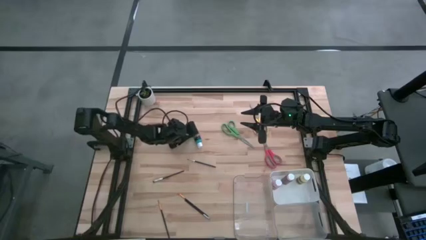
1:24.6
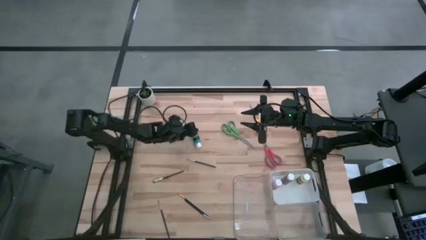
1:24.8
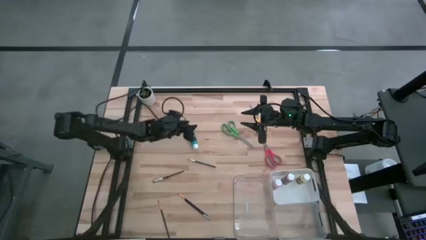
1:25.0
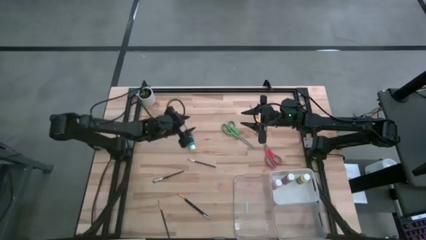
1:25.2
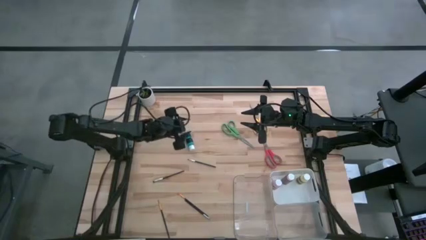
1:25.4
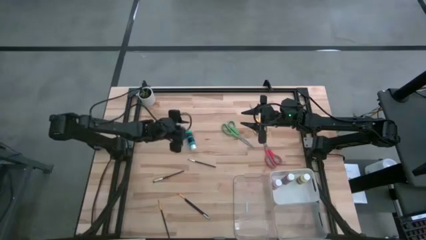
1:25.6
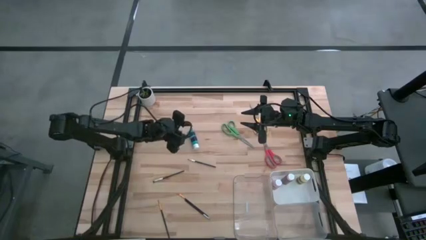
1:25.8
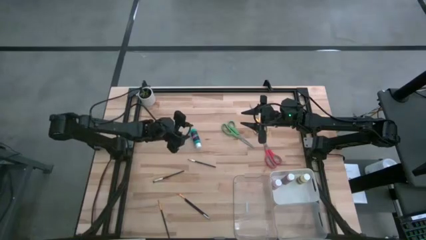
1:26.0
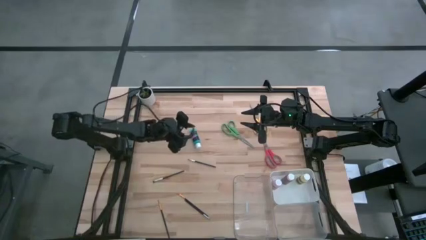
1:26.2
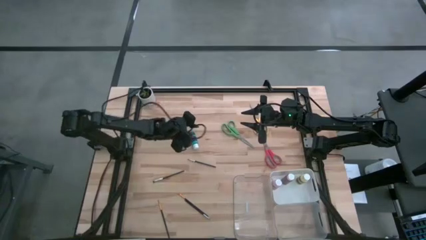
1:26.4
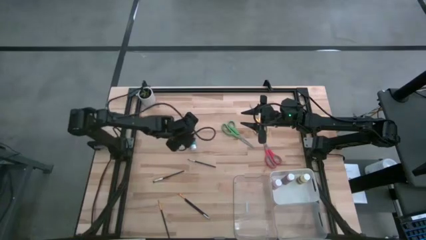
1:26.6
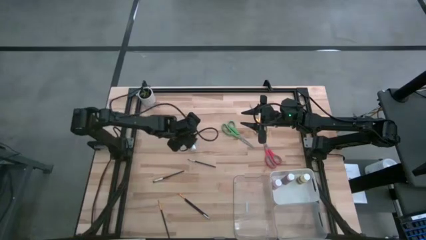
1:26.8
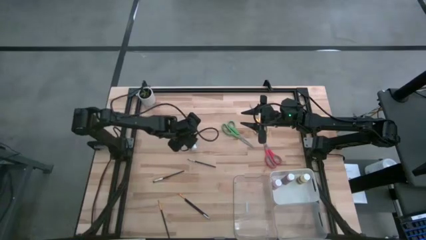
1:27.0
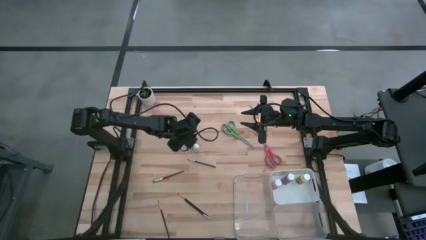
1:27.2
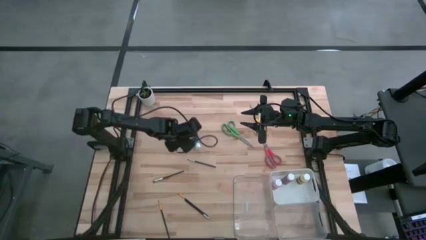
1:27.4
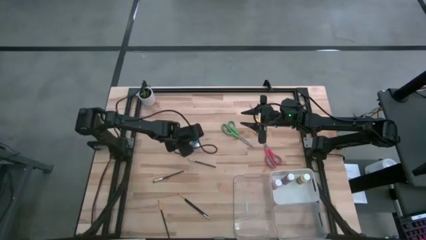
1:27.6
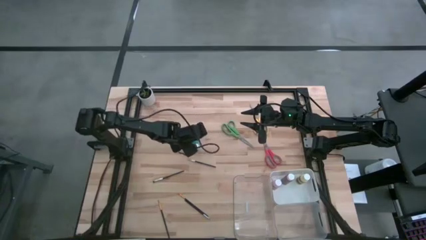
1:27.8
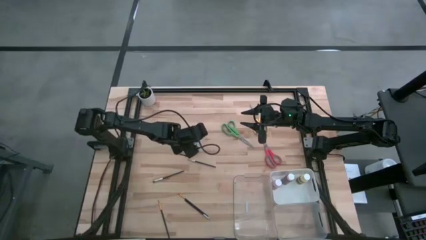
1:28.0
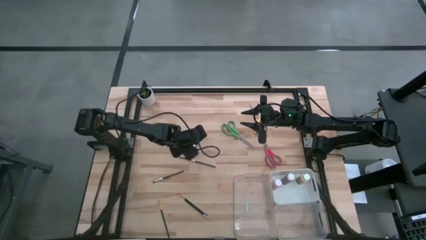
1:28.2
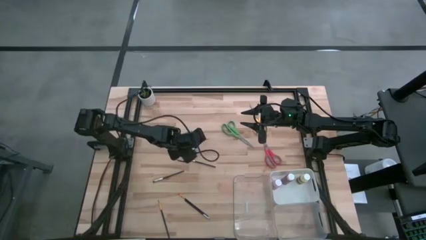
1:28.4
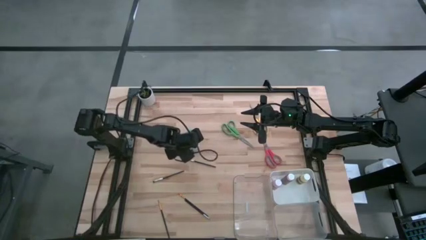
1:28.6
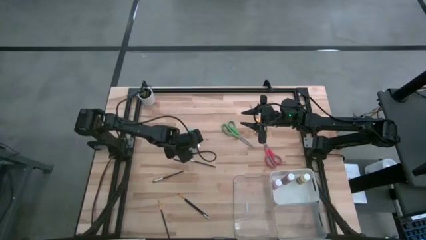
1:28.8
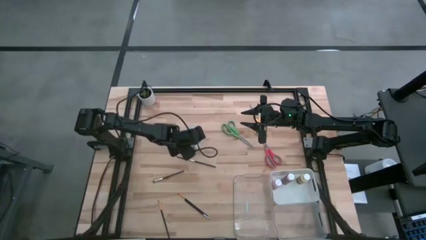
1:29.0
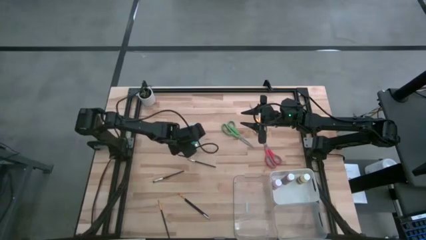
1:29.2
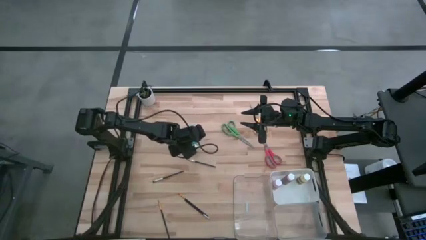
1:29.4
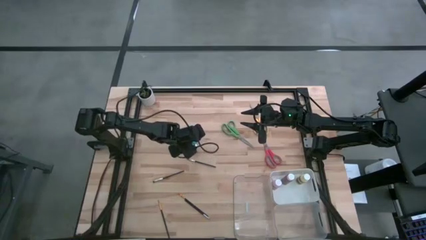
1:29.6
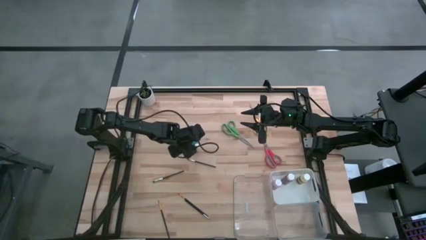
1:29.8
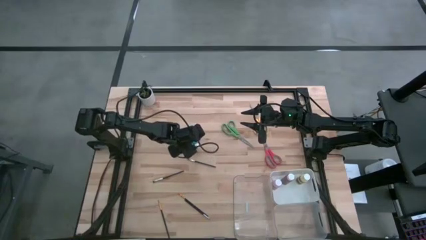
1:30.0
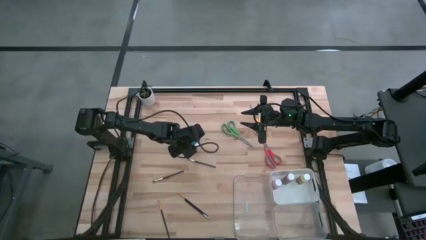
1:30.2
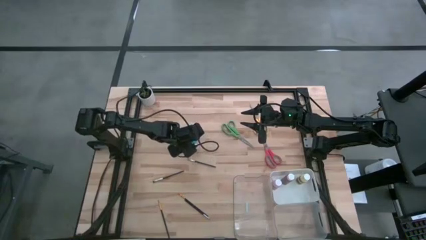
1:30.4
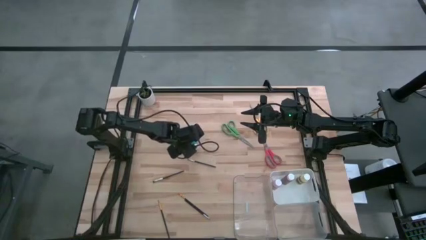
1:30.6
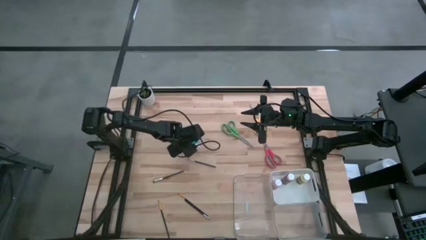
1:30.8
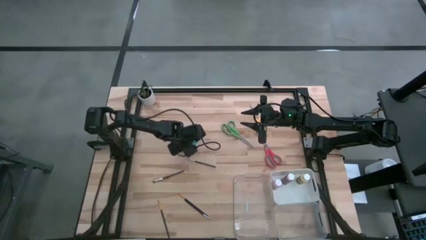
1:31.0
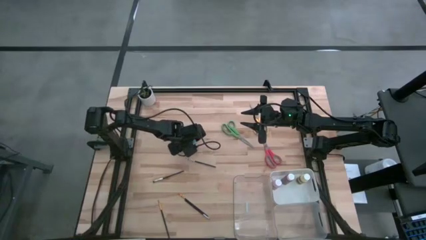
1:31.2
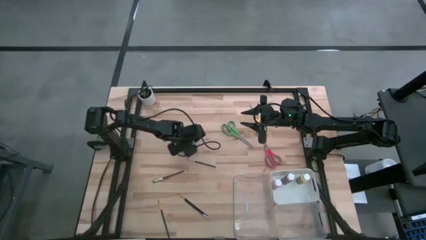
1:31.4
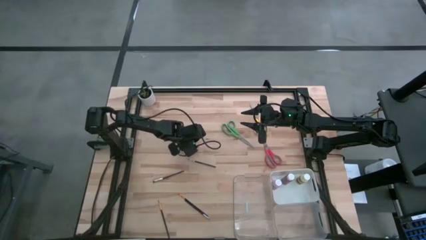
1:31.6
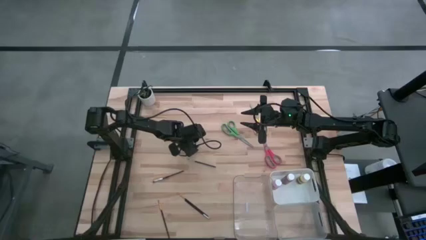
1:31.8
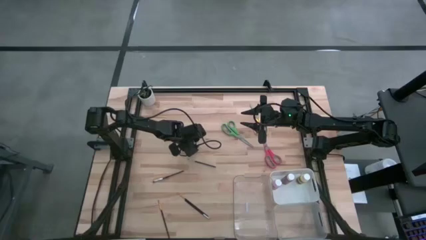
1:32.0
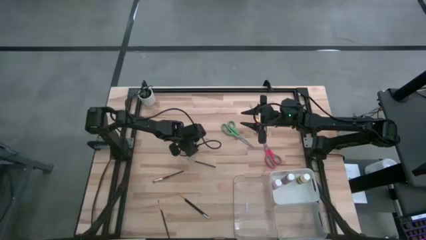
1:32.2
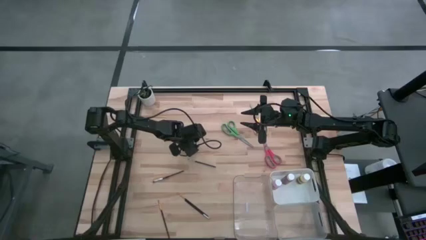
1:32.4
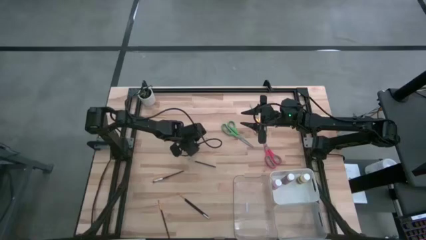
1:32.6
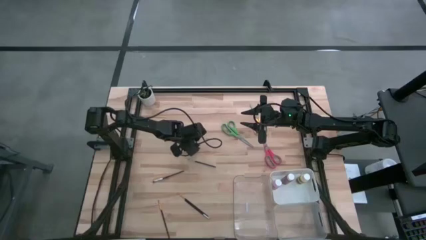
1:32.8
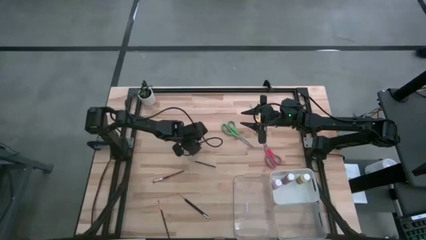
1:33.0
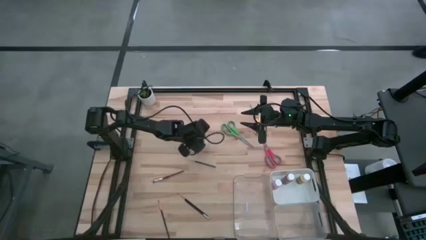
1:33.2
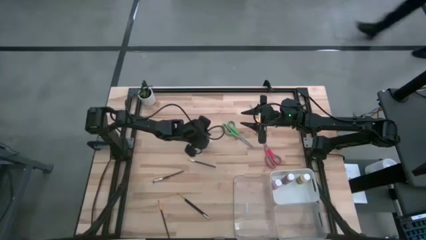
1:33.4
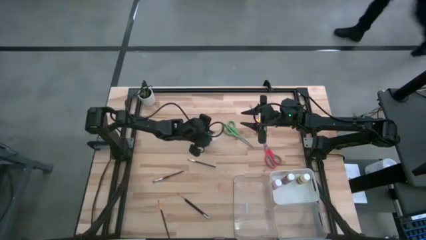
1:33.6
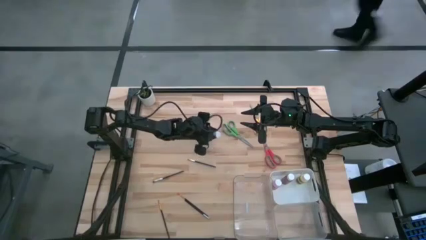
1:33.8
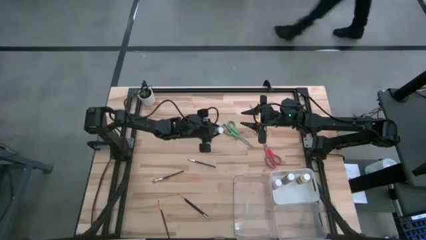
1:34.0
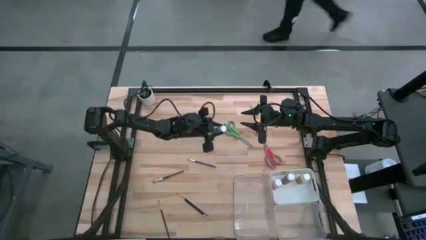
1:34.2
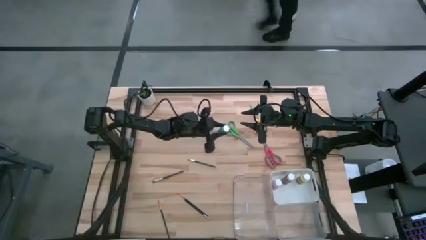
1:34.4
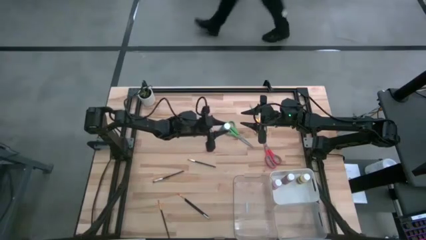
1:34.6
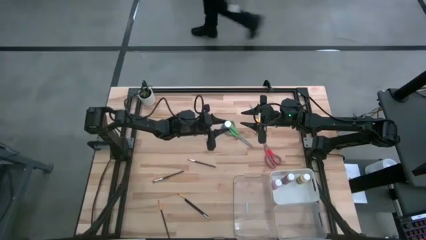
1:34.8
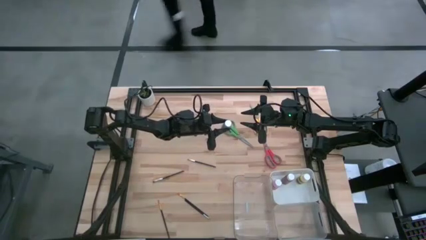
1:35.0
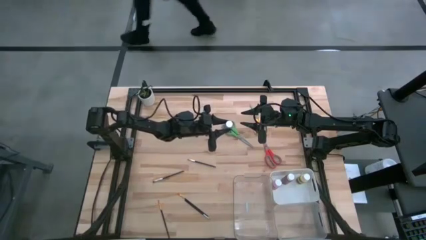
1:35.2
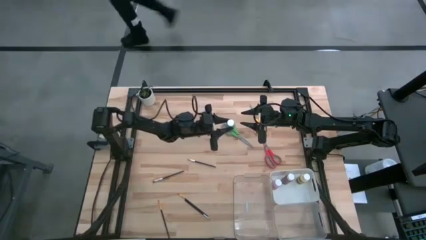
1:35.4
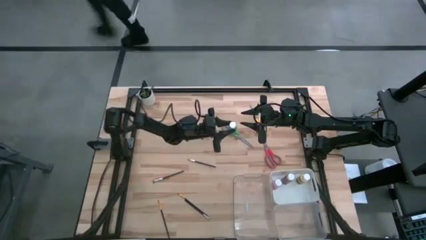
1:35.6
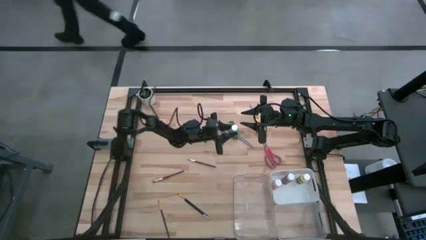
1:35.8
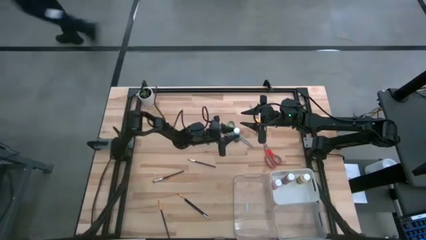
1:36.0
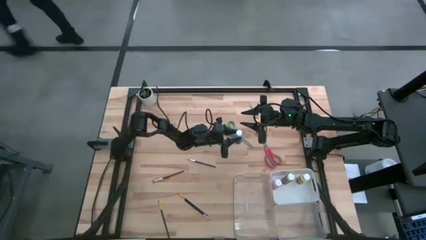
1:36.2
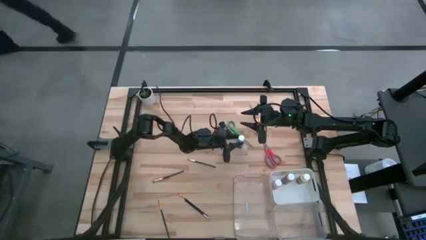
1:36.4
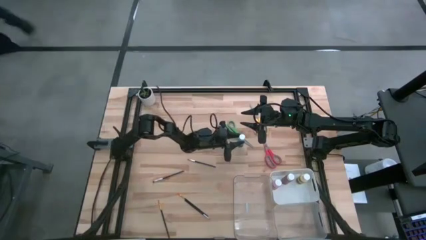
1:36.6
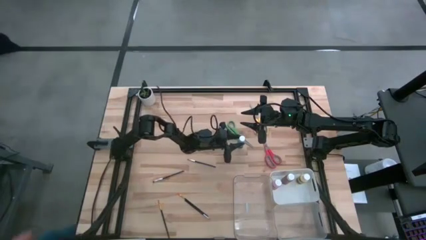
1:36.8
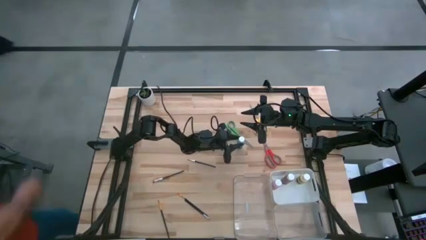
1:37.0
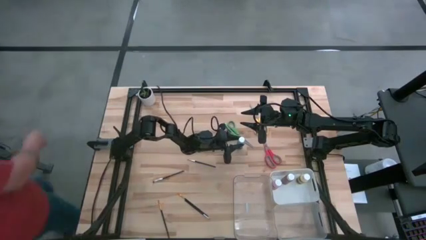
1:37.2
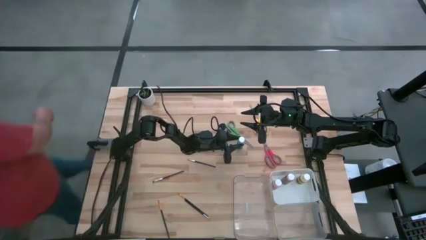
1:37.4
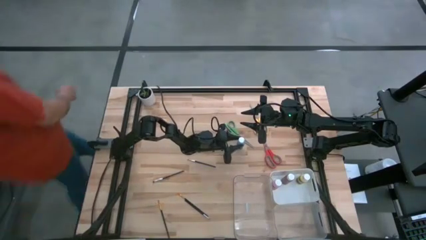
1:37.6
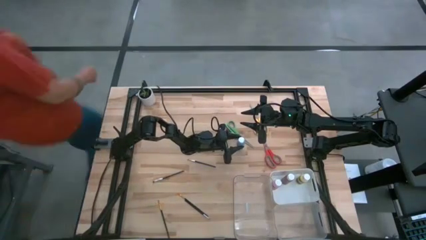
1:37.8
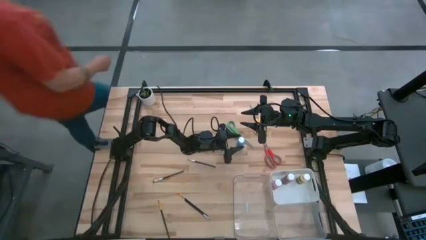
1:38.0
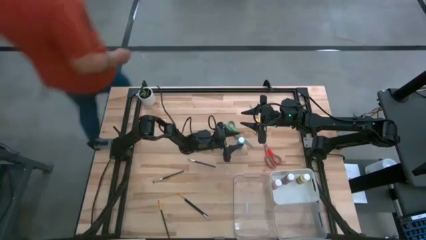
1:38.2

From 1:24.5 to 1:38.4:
Task: Pick & Place Paint Supplies
Put the blue paint bottle into the white bin

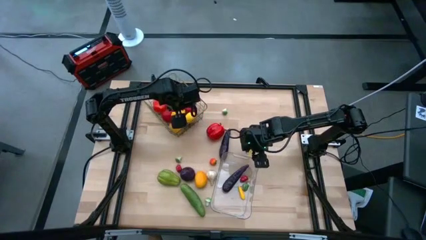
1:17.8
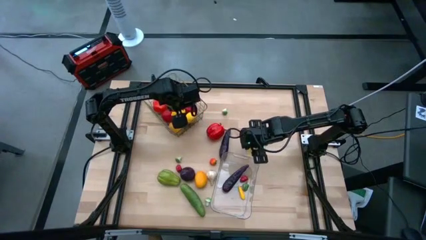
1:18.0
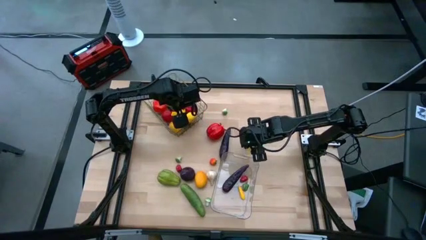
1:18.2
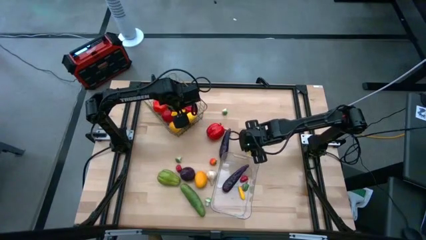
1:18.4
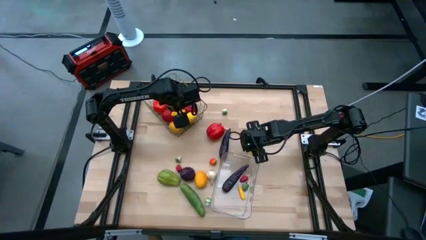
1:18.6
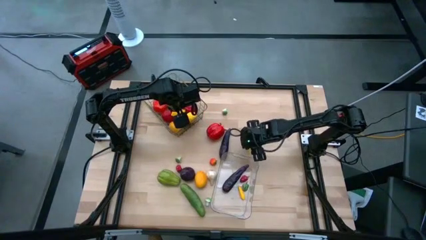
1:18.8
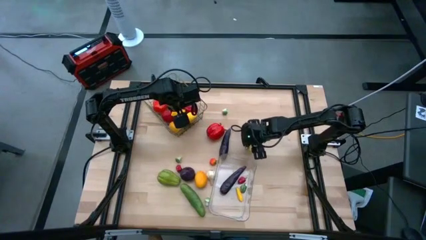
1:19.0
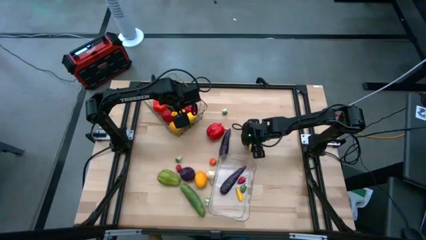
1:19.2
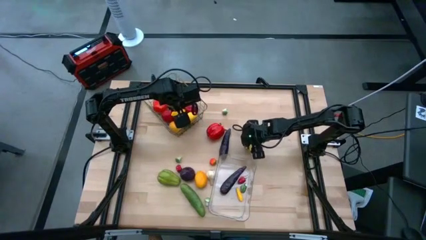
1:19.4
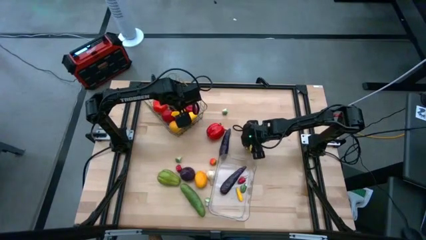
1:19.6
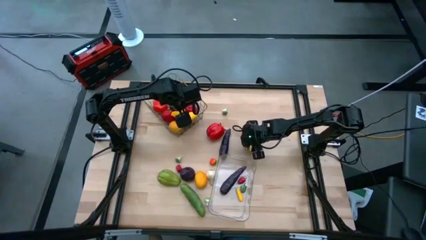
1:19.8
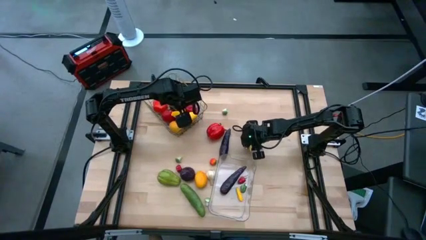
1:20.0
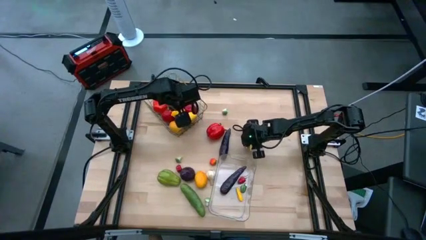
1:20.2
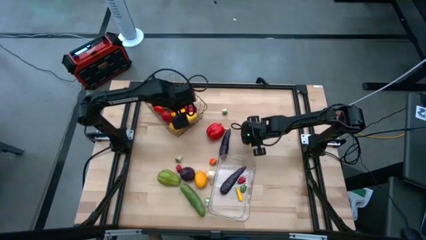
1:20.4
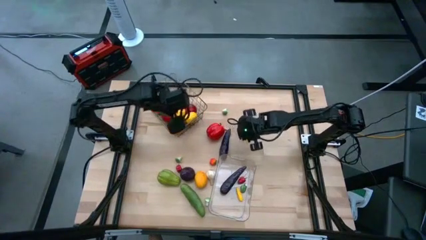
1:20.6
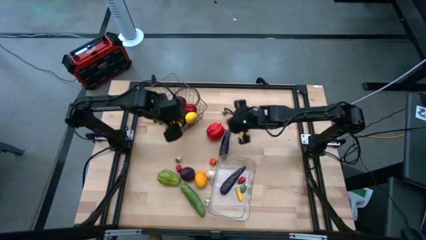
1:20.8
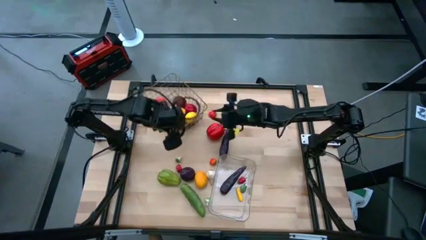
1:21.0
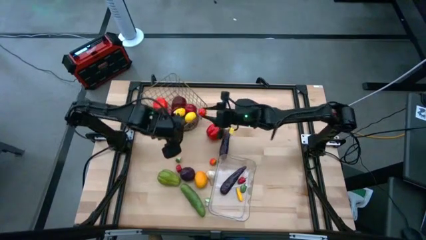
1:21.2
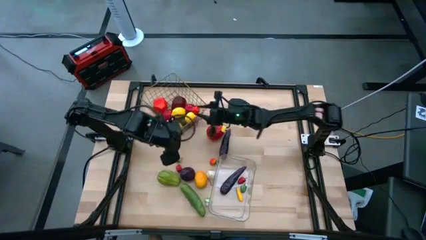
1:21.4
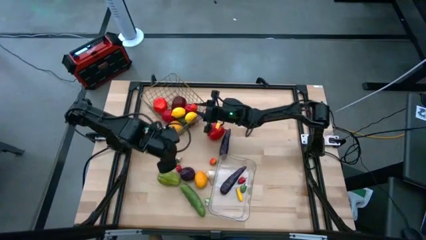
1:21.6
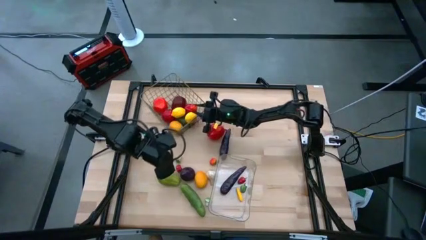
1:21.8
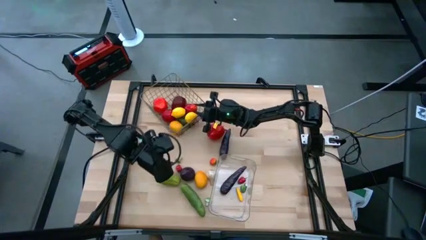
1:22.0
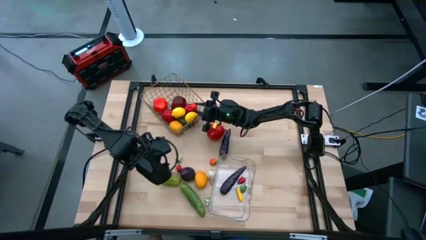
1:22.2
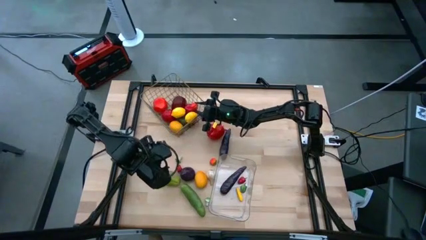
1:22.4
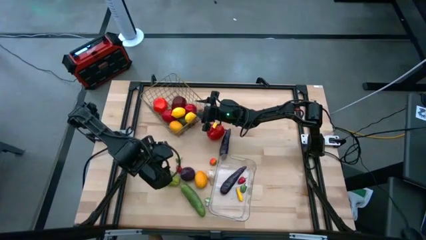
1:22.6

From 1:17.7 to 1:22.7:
Task: Sort produce into baskets
Put the small red tomato into the wire basket
